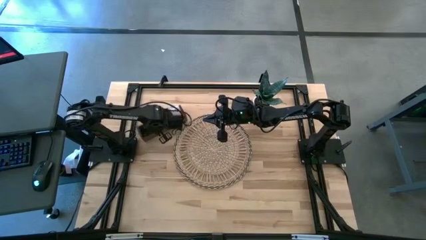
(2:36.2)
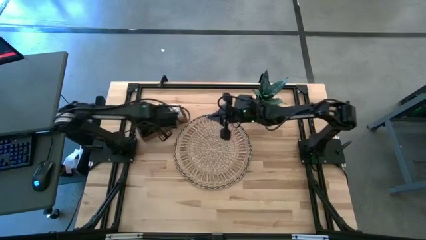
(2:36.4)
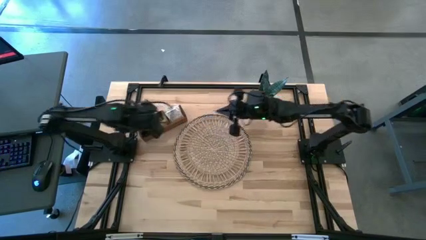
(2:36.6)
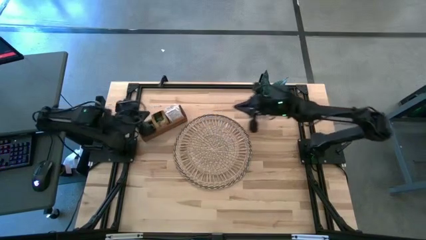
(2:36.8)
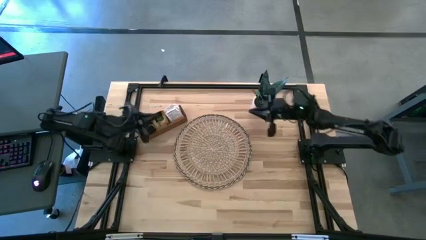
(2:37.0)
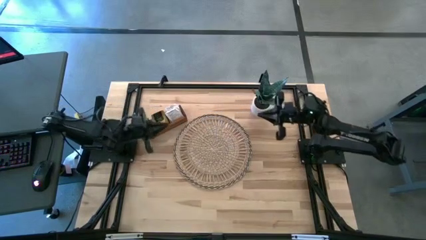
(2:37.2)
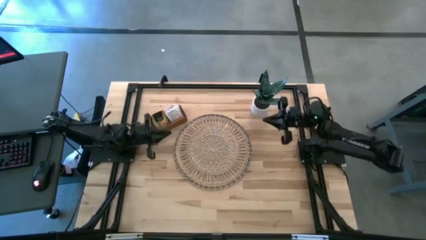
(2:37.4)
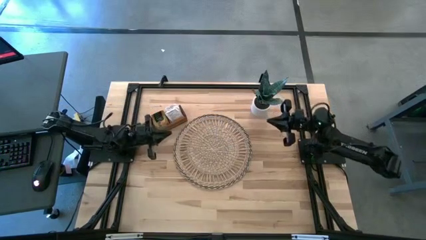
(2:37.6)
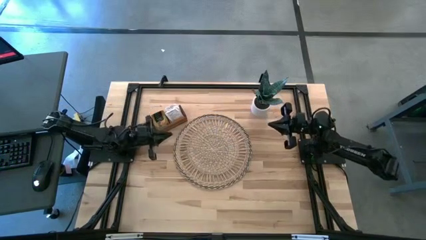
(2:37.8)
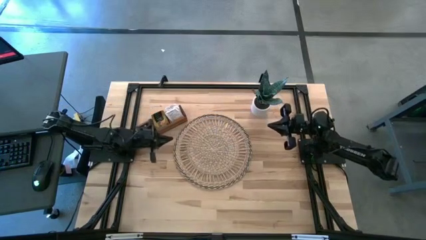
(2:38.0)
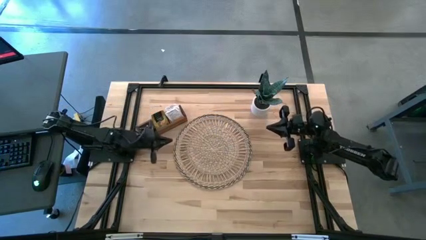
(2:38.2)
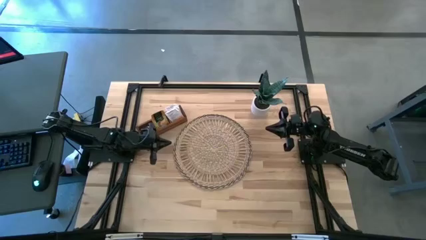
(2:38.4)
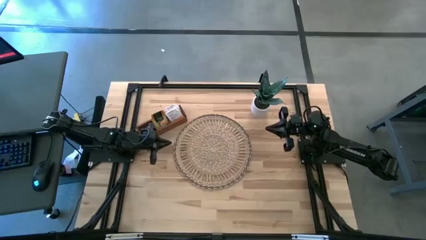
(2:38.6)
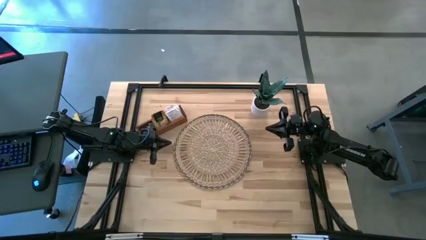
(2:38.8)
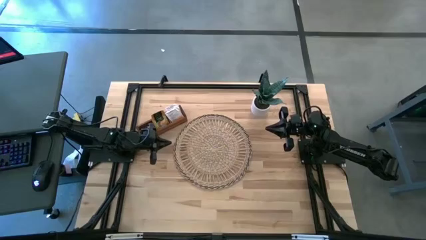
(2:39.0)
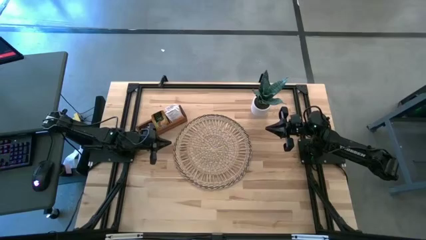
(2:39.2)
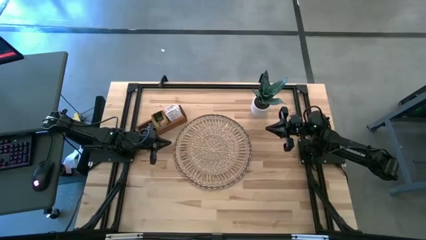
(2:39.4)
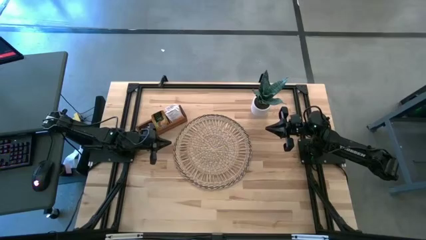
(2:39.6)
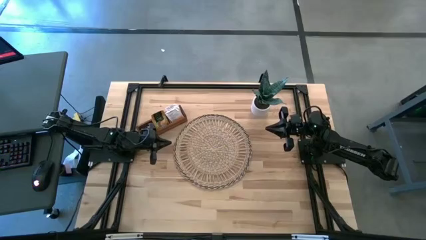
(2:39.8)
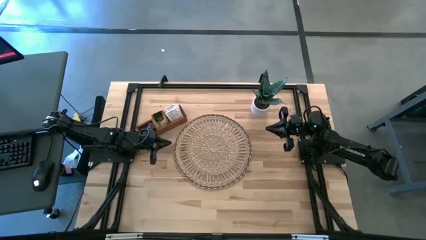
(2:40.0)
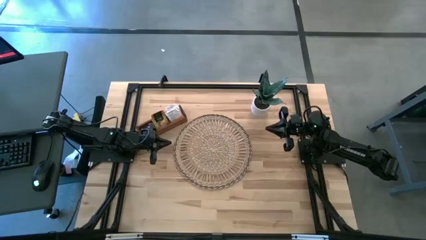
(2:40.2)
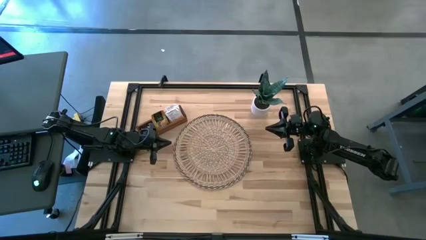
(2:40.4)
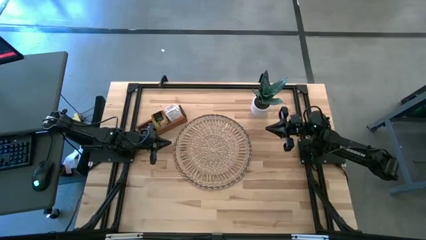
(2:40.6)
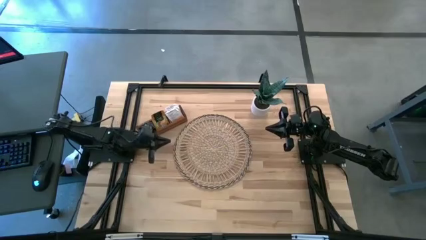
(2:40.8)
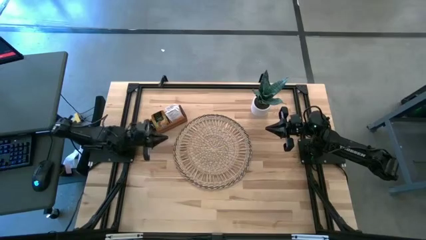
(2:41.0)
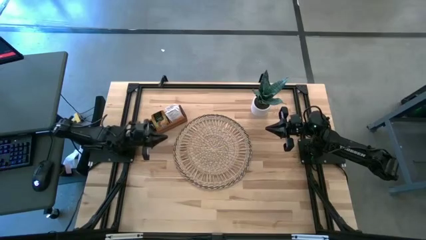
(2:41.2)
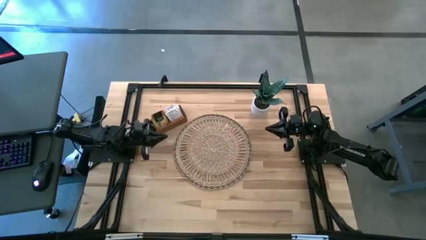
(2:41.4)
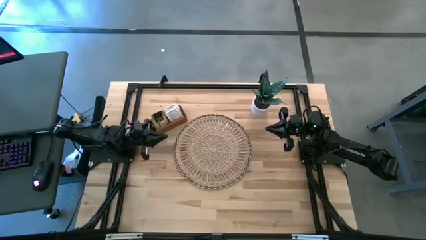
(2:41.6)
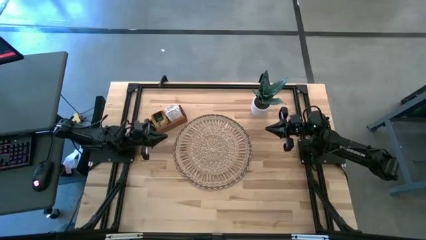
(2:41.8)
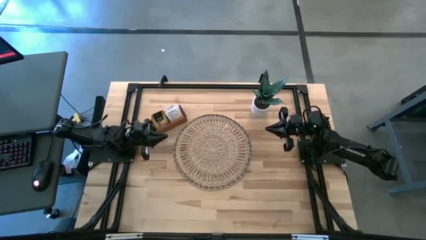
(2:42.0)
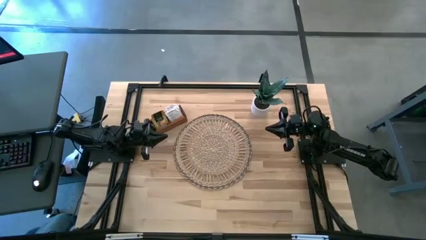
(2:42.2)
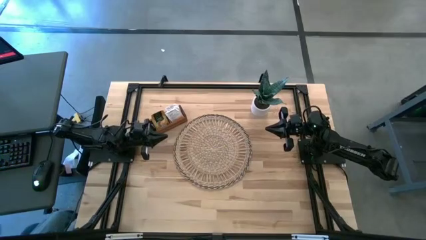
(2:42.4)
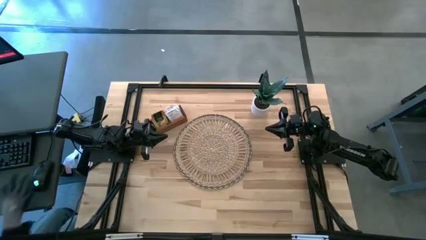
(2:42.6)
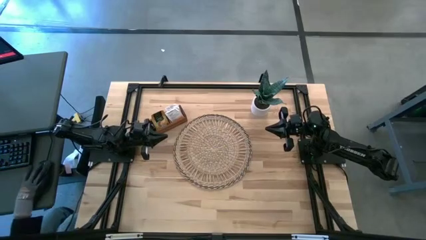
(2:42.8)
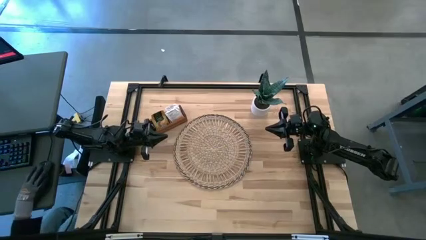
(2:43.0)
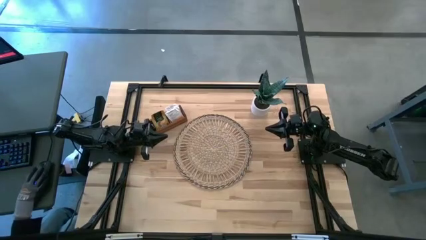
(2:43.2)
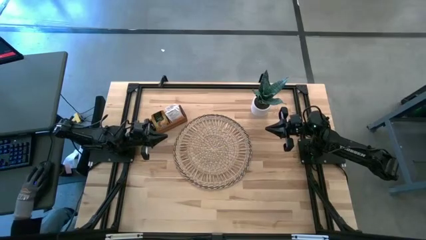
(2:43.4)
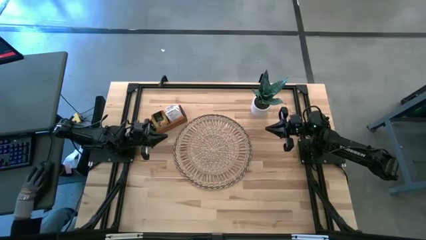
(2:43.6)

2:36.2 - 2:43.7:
Task: Pick & Place Tea
Return to Home Position

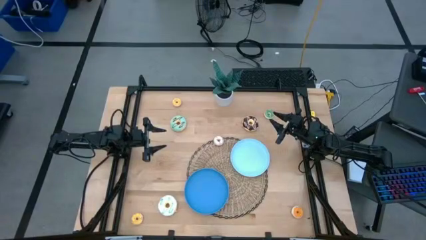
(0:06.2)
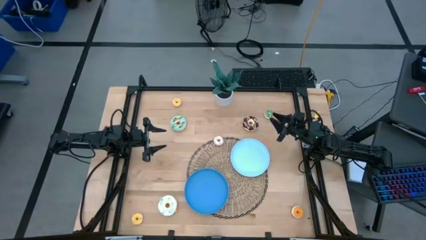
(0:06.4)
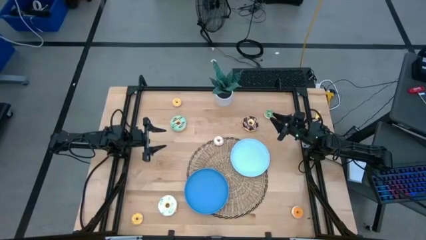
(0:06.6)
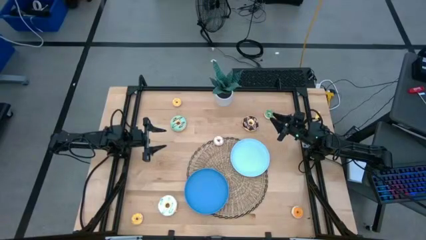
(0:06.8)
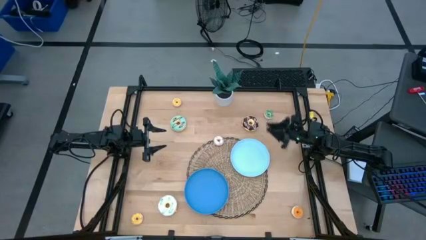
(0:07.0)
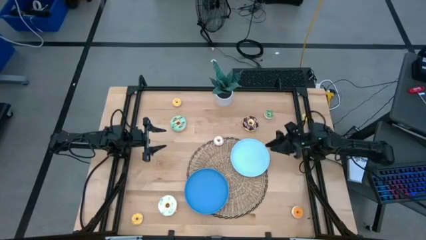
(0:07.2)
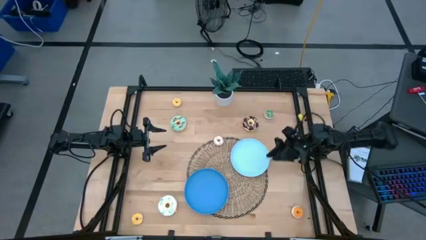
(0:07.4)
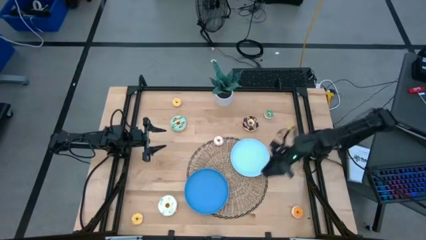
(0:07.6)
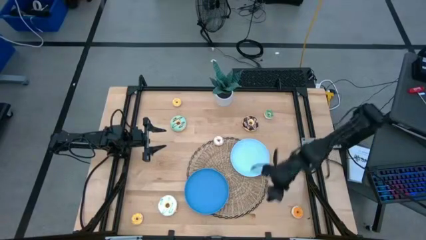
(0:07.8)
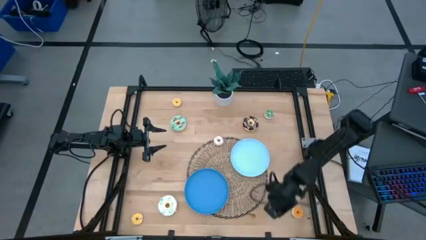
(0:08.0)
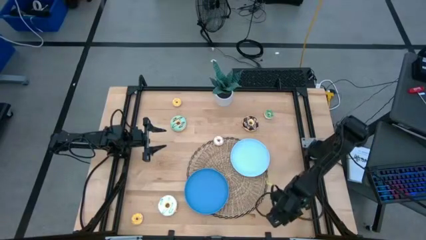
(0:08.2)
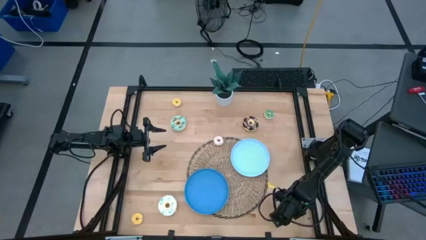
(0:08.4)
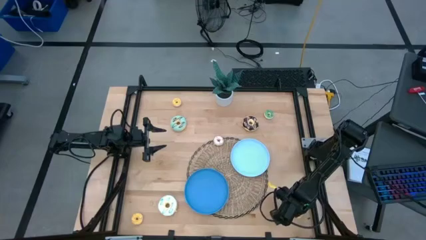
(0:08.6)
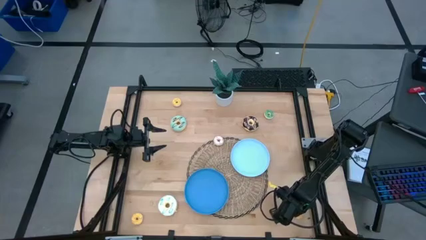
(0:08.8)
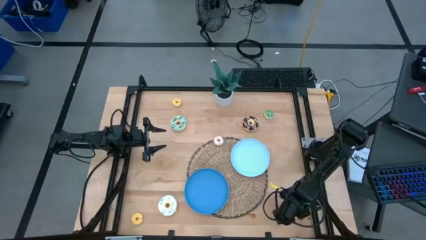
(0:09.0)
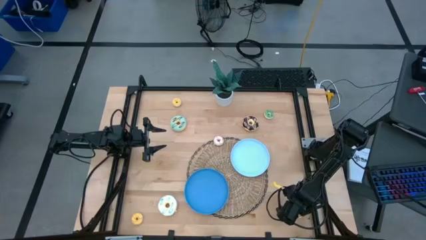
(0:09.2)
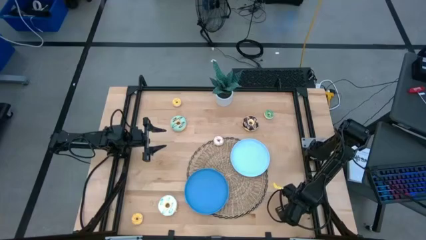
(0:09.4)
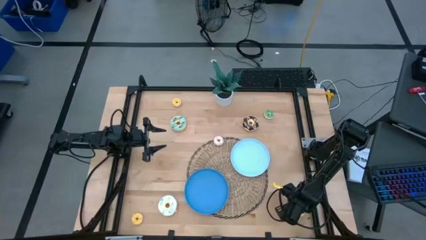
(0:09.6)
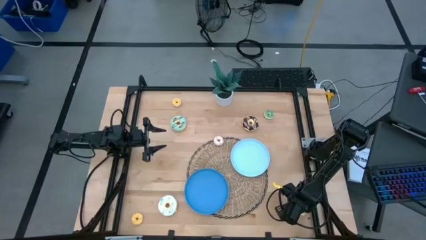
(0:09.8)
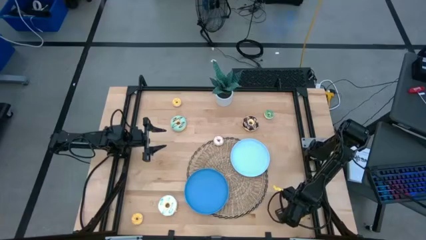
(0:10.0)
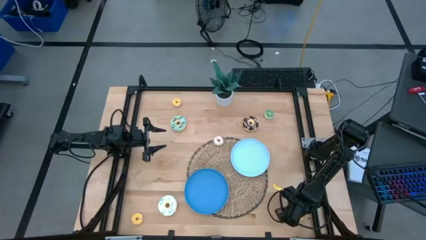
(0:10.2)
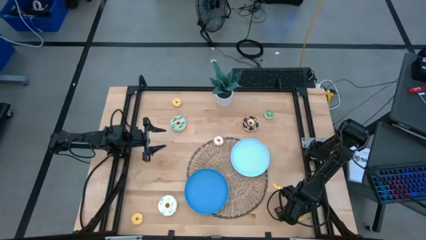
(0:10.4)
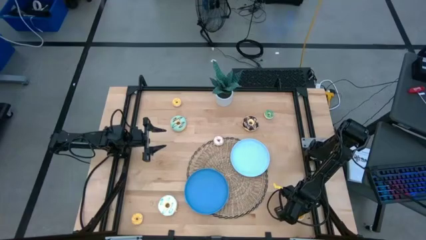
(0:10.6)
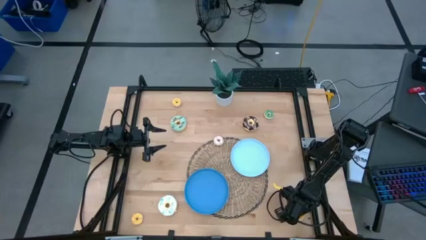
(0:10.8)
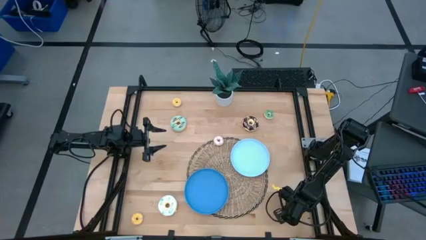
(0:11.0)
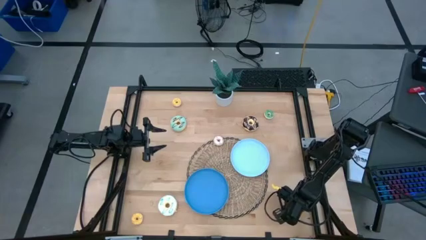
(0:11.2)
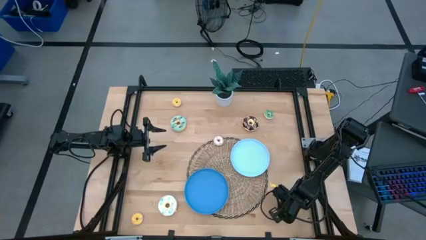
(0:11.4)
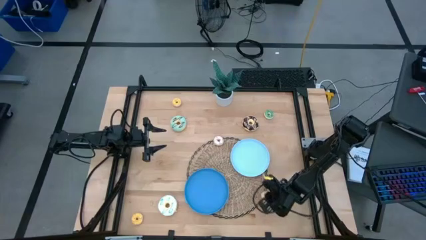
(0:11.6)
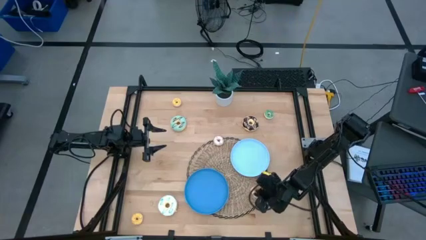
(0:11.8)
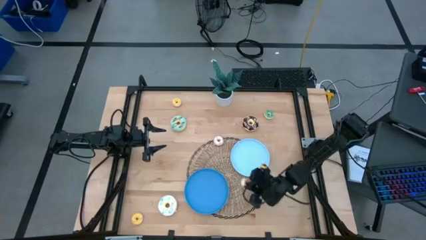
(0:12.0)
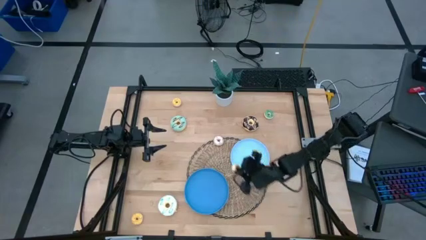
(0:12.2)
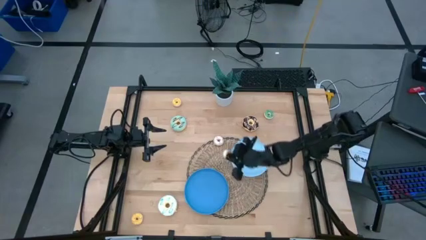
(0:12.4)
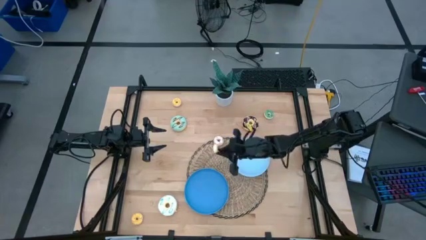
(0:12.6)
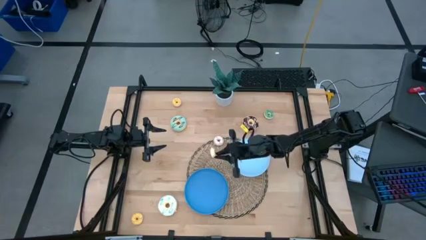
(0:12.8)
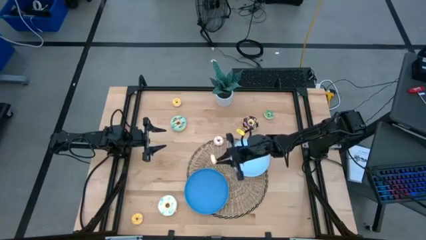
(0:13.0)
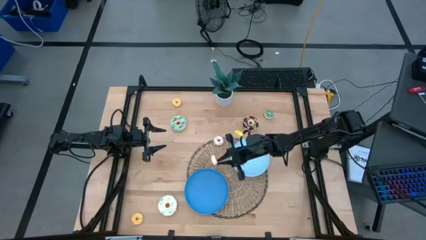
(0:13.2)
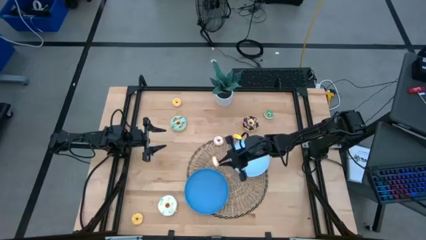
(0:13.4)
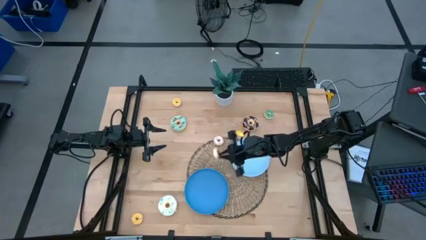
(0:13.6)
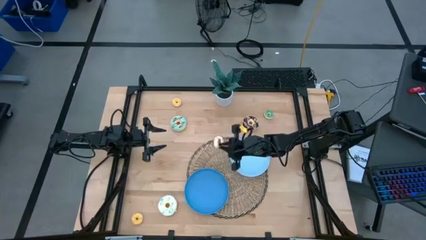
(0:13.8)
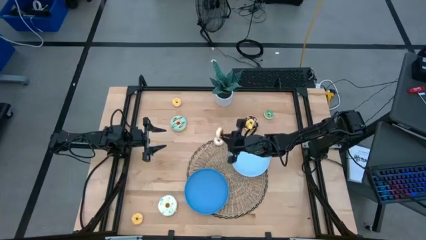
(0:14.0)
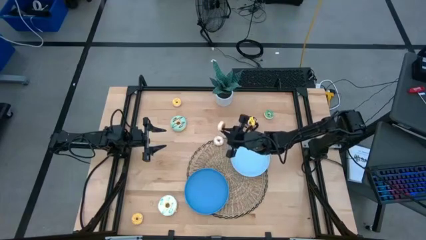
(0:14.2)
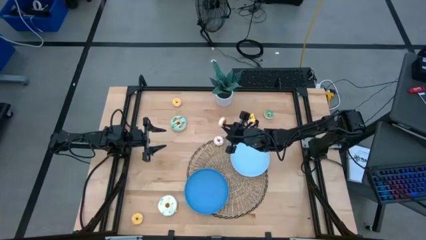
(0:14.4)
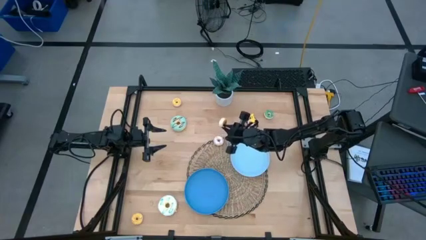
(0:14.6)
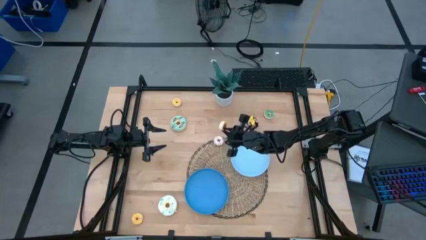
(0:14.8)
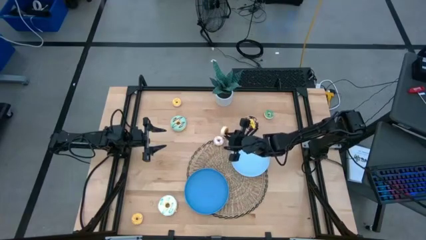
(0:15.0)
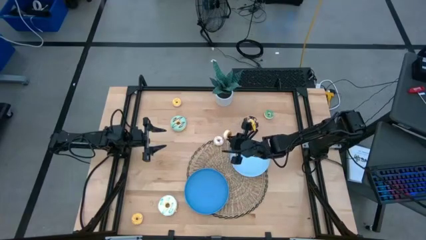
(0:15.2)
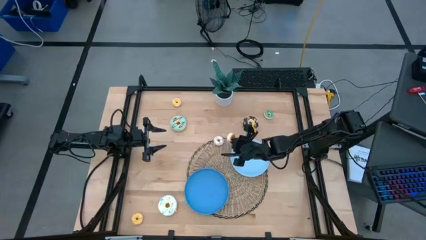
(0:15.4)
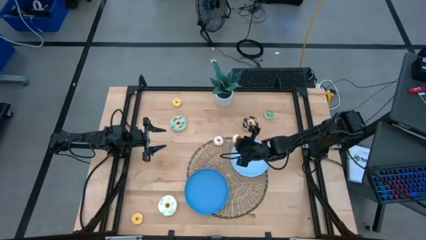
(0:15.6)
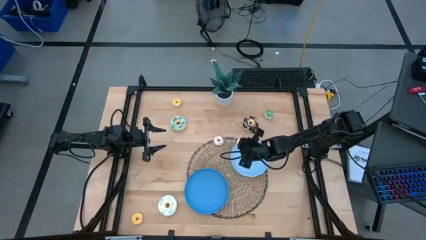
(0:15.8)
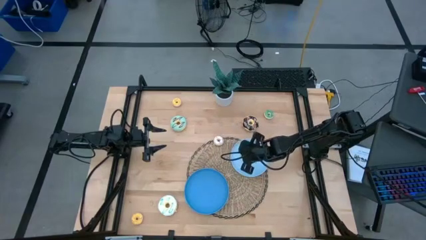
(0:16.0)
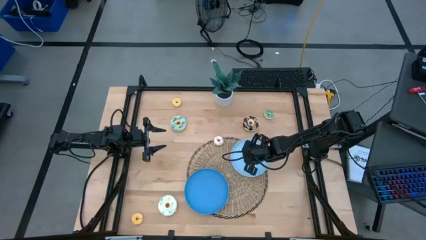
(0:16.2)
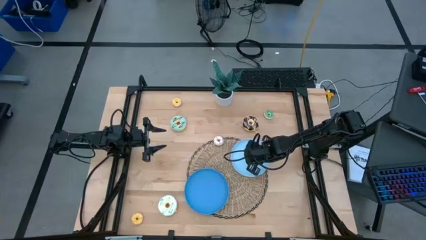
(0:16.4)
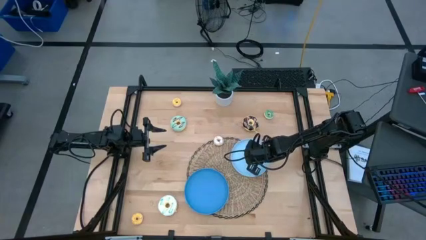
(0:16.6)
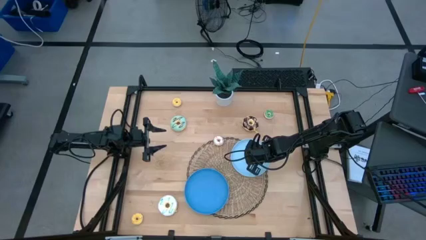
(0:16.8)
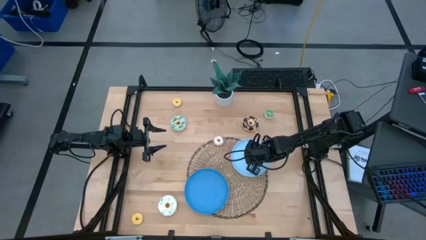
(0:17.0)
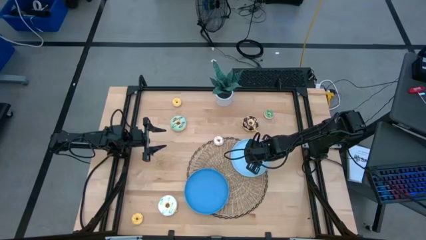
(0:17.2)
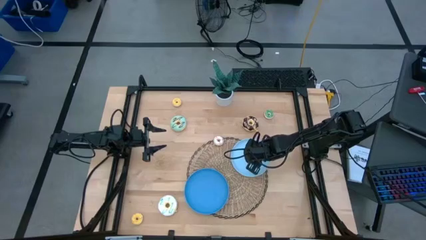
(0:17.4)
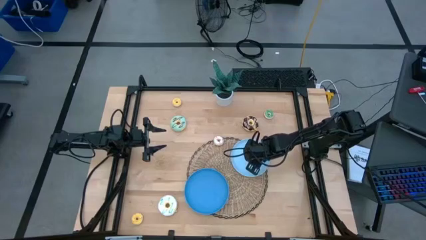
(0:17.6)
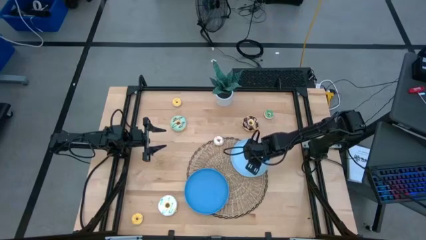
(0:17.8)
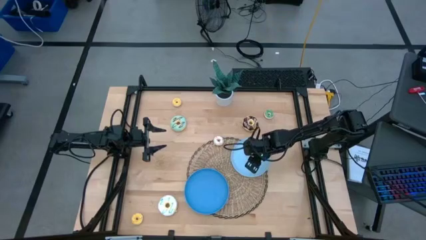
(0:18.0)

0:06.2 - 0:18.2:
Task: Pick & Place donuts
Put the small orange donut on the light blue plate
